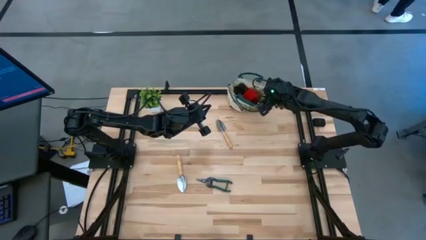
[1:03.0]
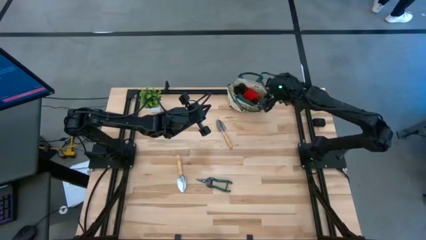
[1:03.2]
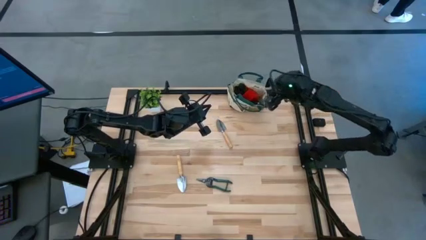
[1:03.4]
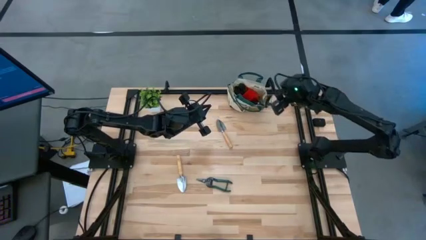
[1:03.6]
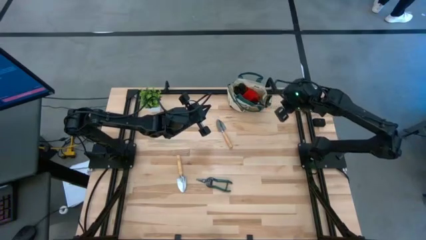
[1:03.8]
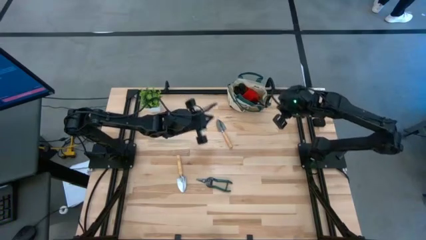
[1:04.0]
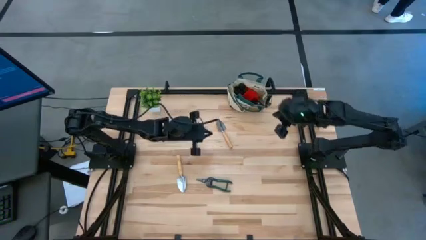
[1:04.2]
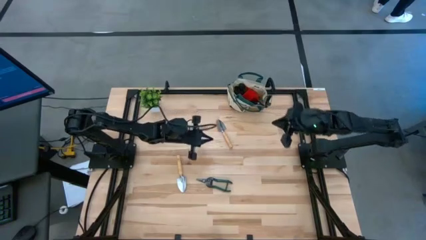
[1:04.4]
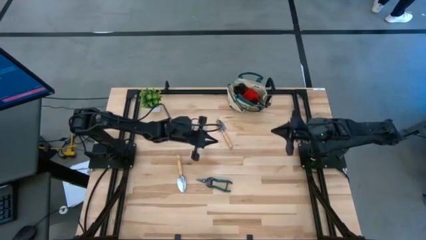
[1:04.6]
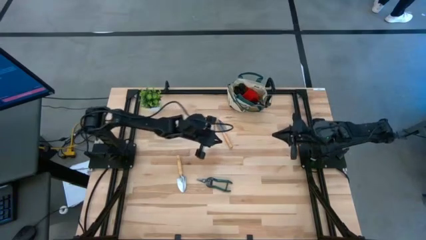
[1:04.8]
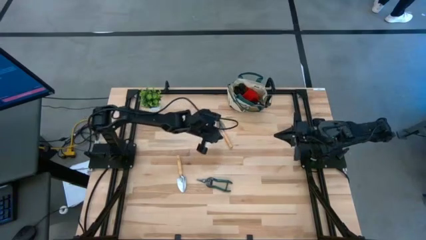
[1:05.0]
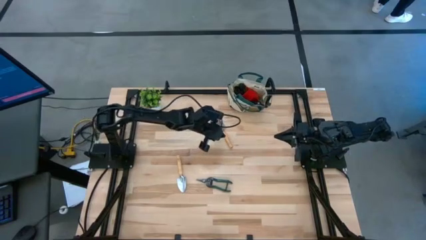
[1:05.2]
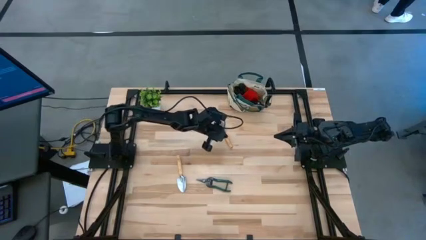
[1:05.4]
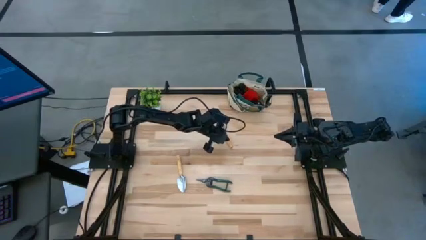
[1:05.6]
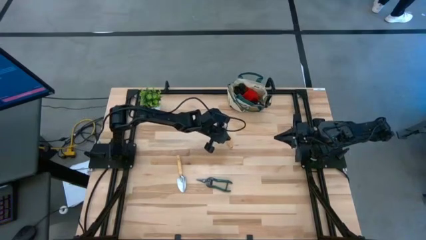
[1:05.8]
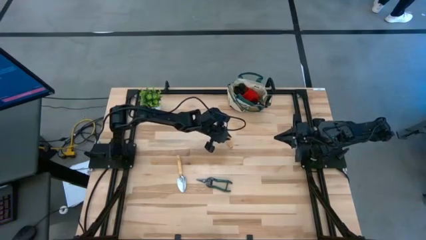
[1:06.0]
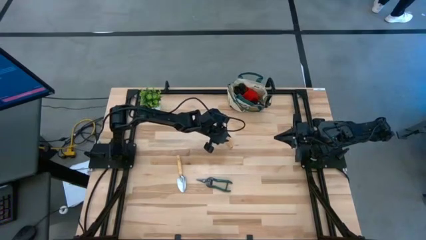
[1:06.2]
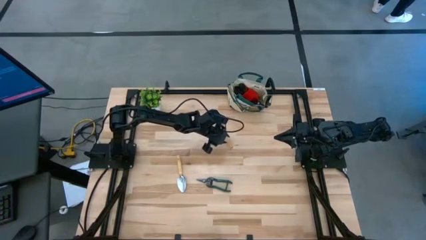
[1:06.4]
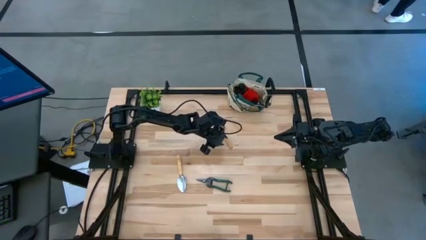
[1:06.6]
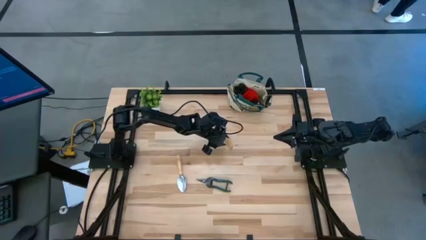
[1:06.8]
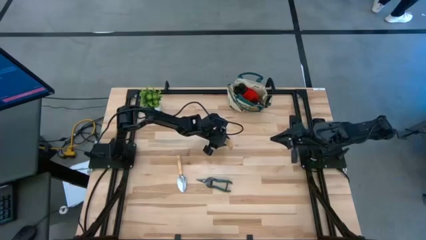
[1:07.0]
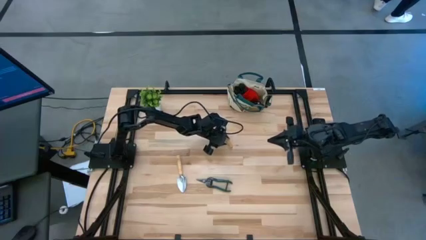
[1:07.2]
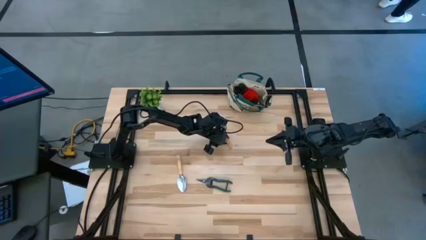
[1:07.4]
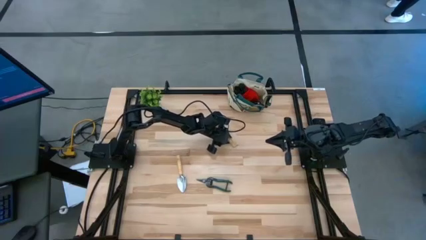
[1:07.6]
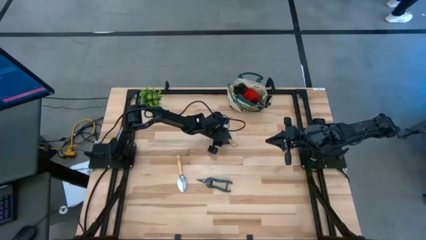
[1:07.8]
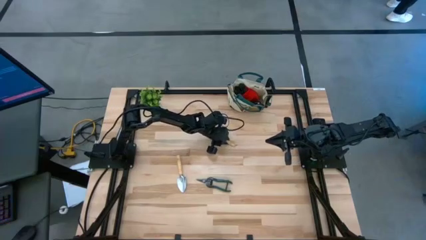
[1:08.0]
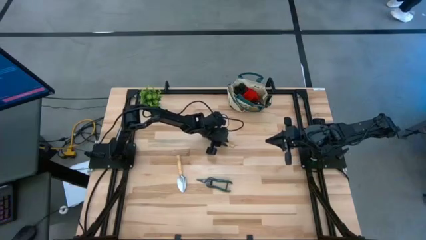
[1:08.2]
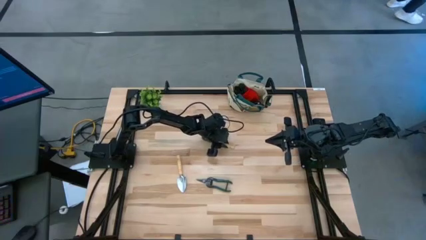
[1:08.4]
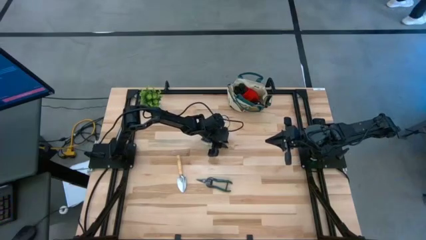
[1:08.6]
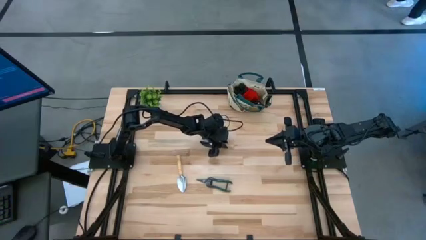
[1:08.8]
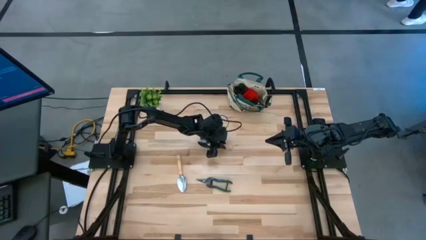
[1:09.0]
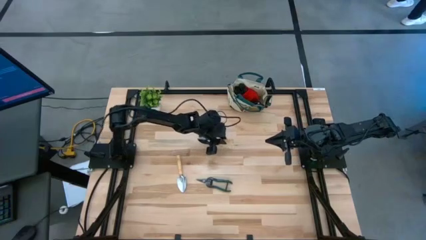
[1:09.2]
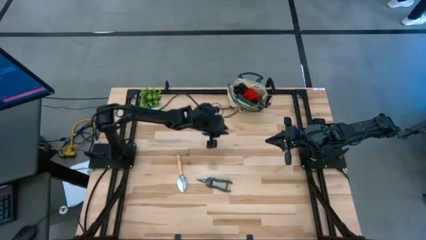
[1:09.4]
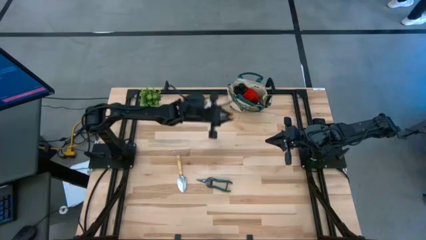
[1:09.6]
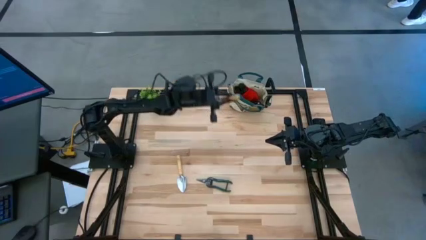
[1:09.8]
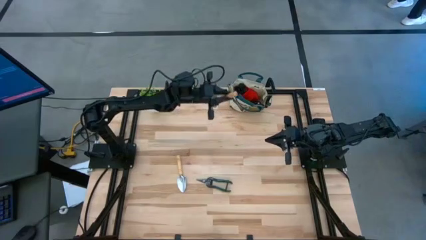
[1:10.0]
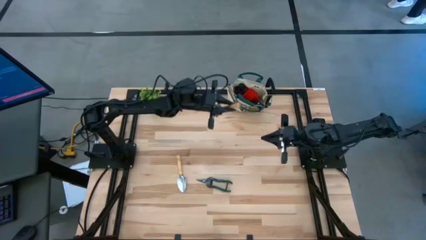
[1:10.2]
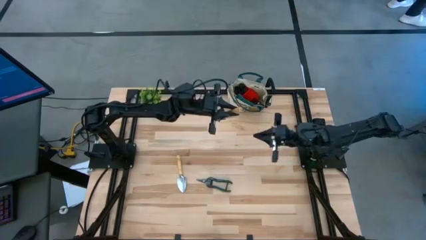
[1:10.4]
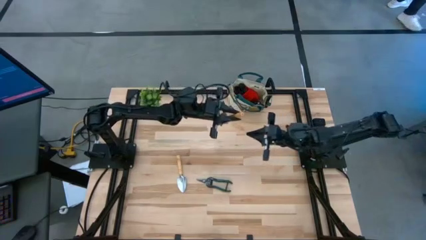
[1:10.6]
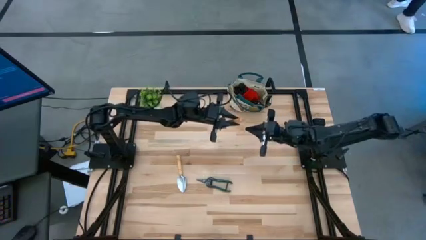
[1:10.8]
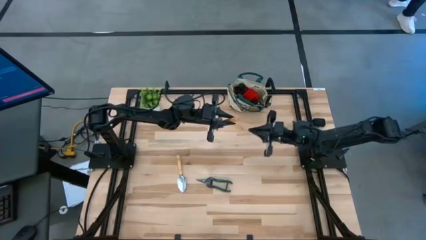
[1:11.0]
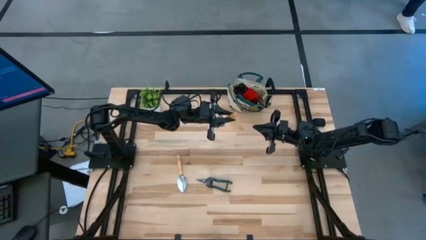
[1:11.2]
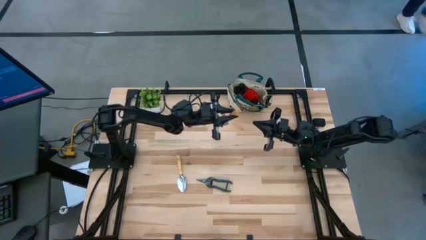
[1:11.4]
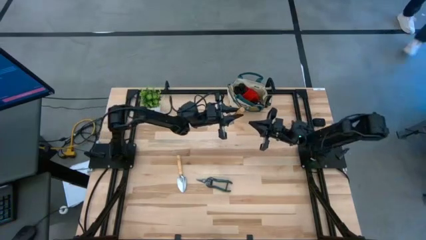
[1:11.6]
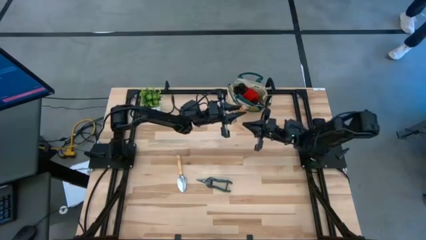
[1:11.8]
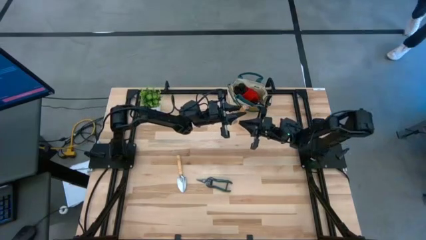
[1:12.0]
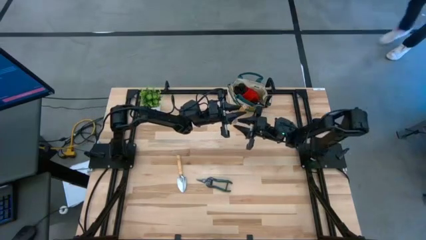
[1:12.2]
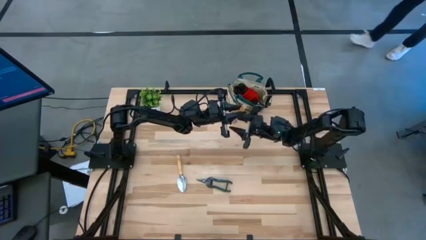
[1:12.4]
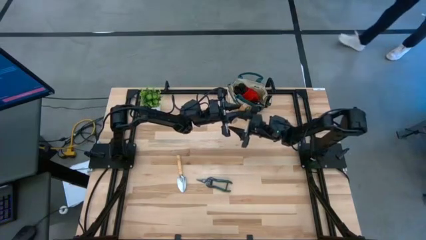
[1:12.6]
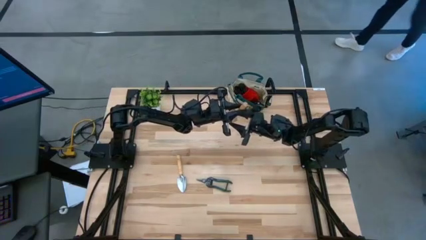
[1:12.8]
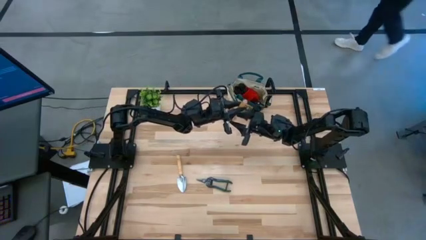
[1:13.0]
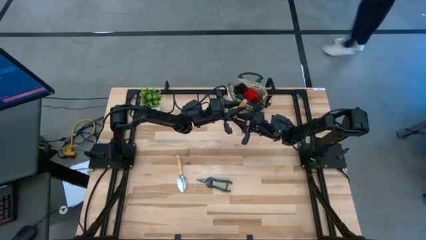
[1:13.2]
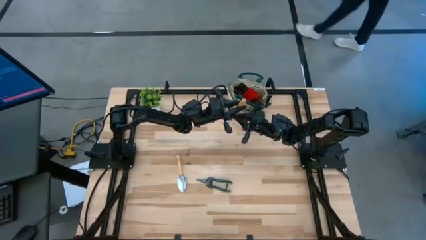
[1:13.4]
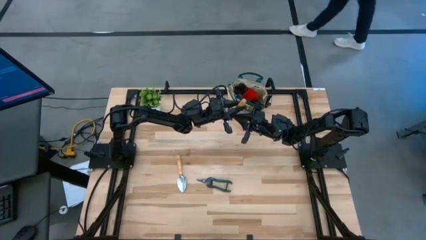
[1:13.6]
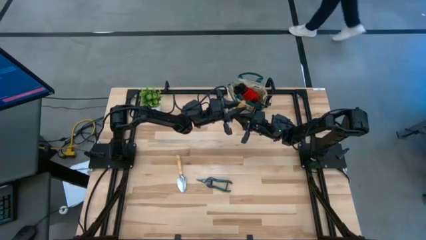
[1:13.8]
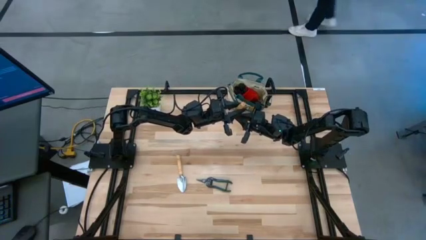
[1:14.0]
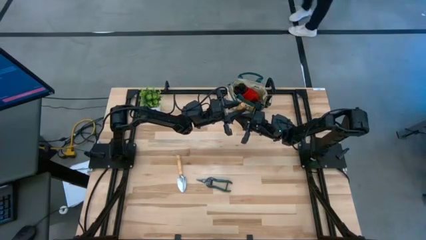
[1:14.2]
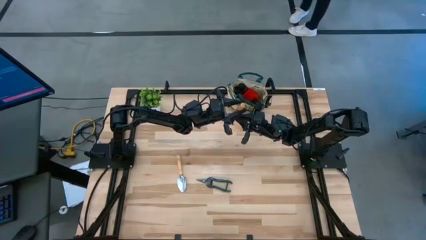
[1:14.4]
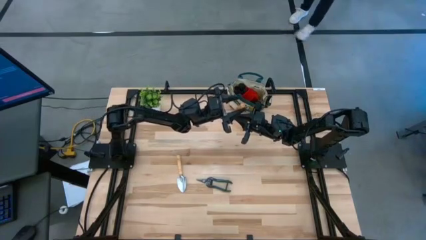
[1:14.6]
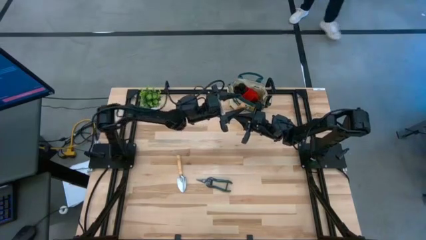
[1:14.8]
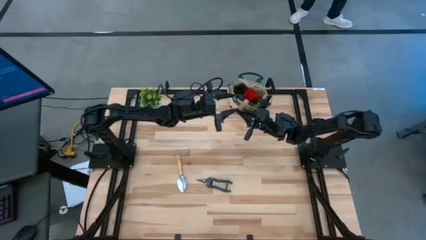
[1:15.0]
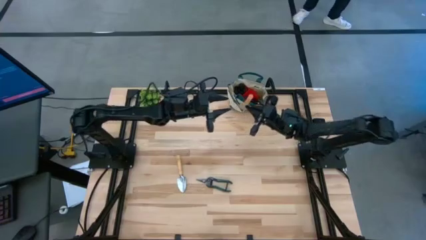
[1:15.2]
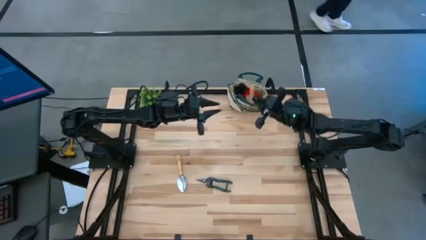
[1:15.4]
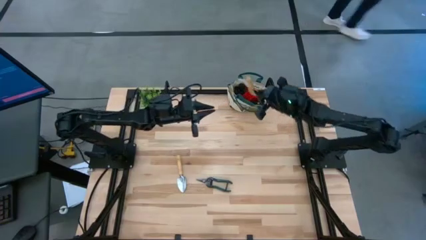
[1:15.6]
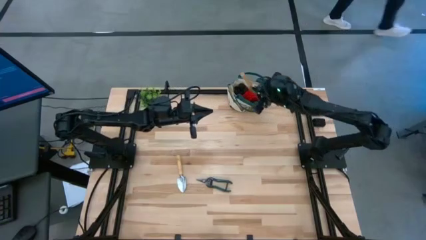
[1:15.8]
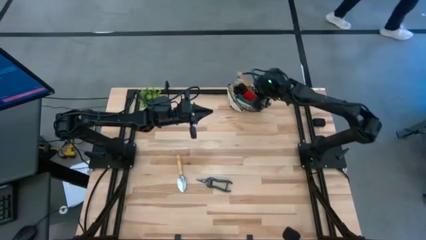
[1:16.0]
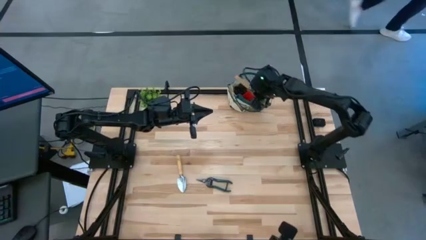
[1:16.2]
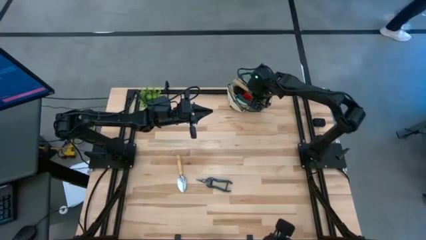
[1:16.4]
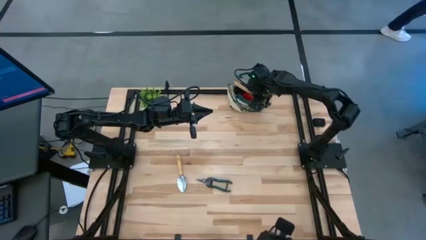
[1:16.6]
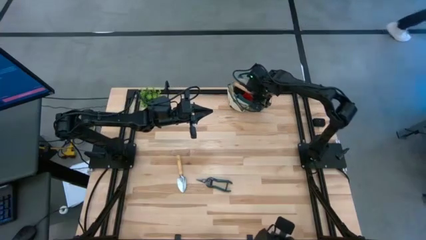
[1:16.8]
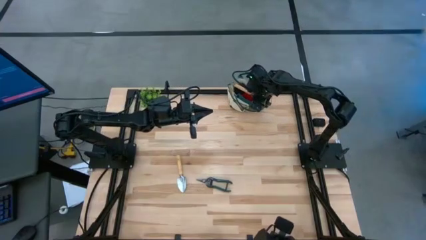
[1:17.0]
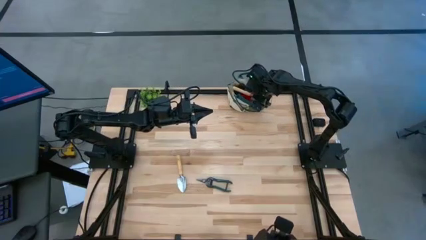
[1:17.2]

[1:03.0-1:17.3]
Task: Pick & Place Garden tools in Gardening bag
Put the top brown trowel into the gardening bag
